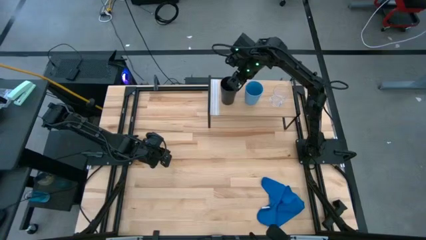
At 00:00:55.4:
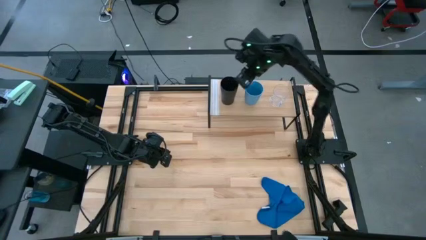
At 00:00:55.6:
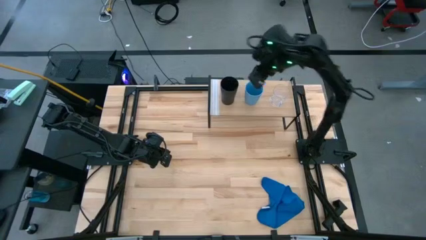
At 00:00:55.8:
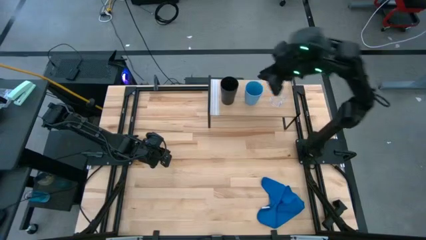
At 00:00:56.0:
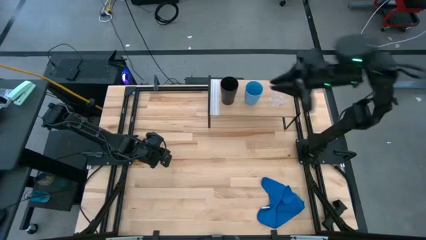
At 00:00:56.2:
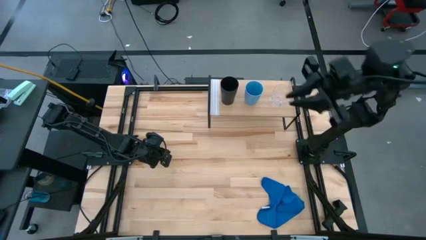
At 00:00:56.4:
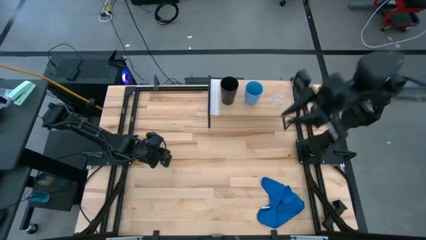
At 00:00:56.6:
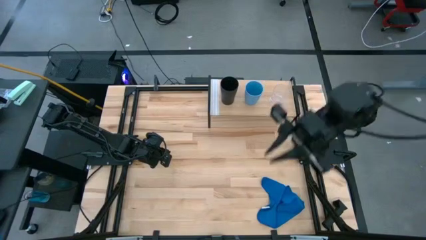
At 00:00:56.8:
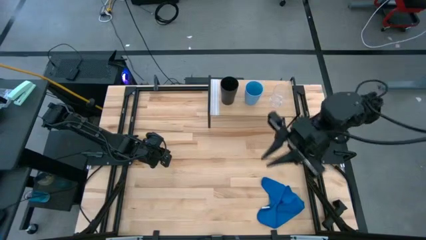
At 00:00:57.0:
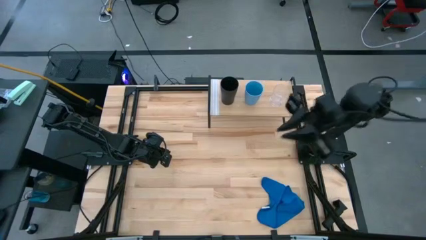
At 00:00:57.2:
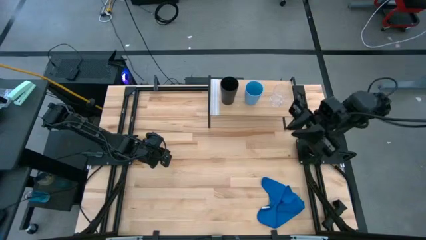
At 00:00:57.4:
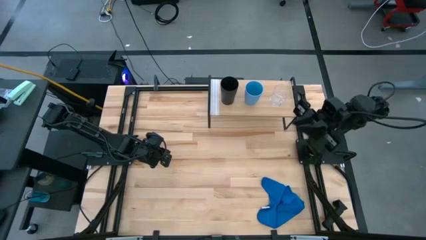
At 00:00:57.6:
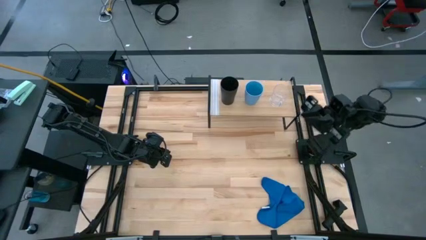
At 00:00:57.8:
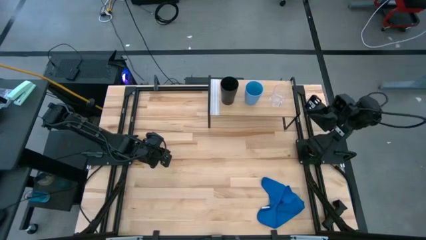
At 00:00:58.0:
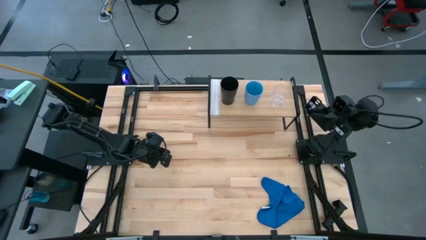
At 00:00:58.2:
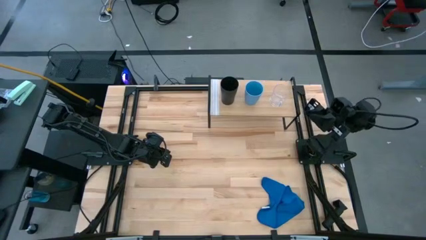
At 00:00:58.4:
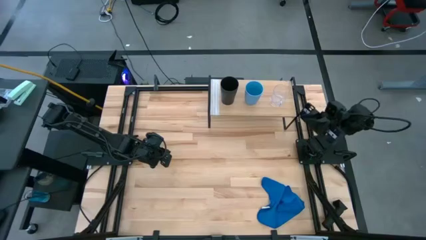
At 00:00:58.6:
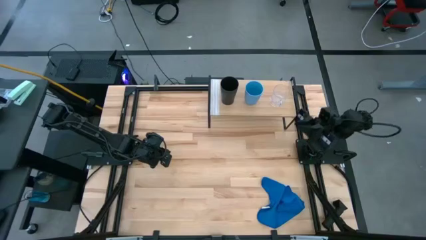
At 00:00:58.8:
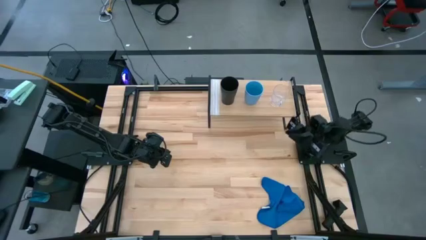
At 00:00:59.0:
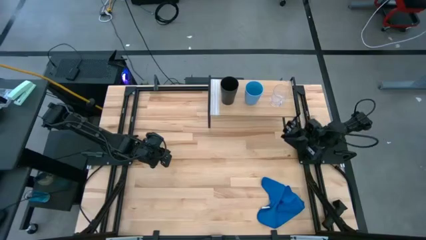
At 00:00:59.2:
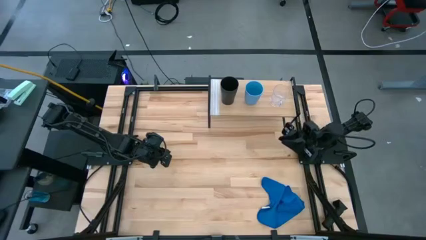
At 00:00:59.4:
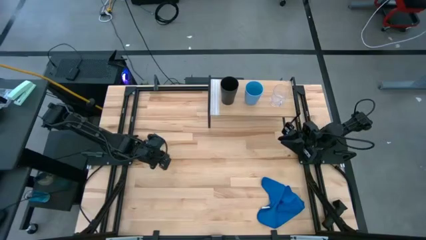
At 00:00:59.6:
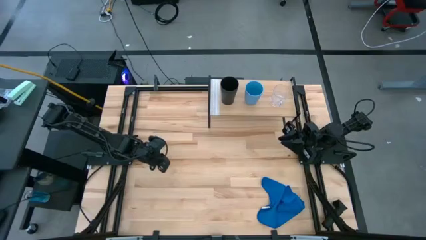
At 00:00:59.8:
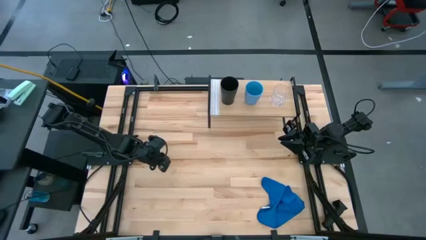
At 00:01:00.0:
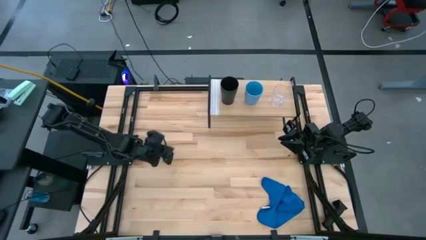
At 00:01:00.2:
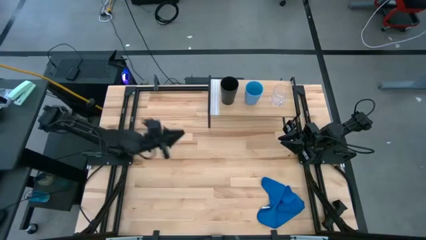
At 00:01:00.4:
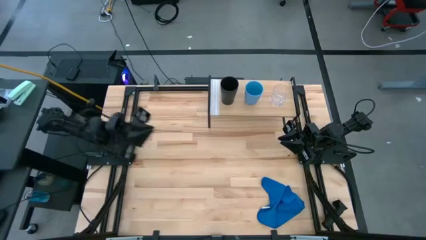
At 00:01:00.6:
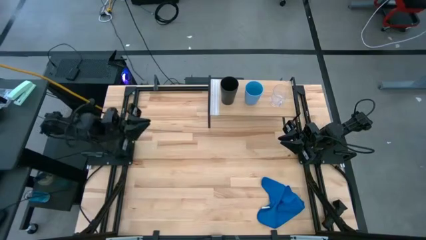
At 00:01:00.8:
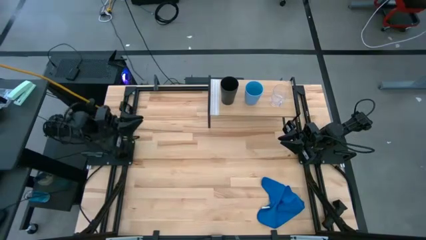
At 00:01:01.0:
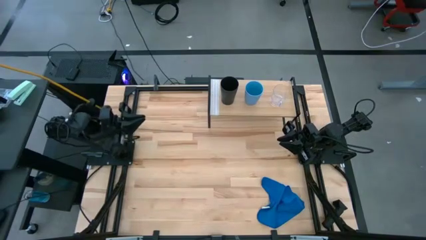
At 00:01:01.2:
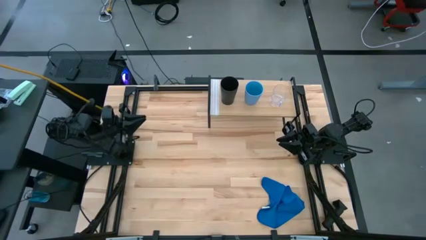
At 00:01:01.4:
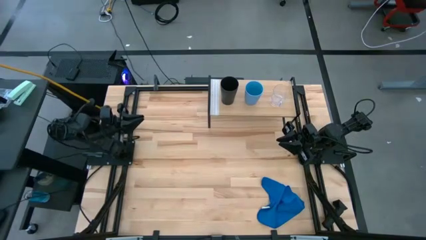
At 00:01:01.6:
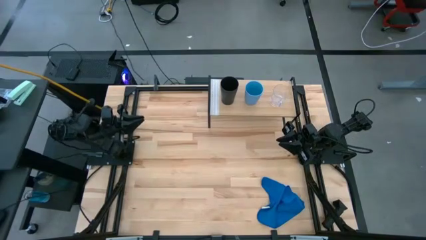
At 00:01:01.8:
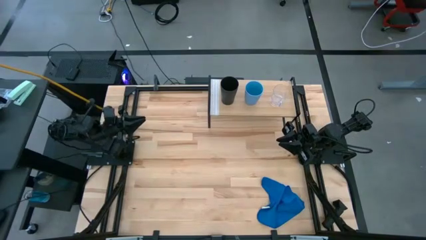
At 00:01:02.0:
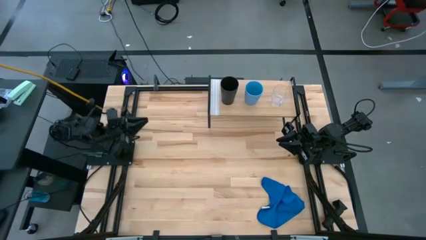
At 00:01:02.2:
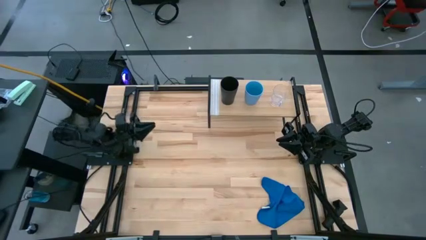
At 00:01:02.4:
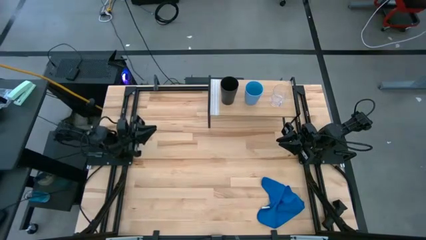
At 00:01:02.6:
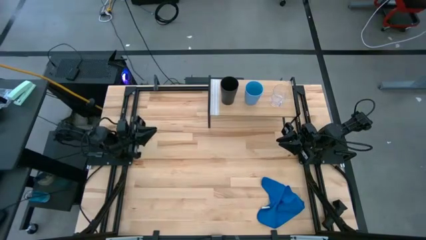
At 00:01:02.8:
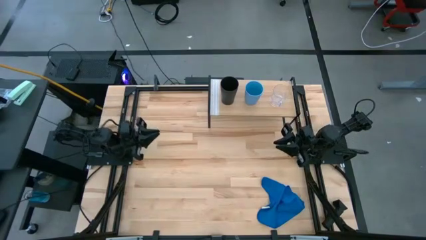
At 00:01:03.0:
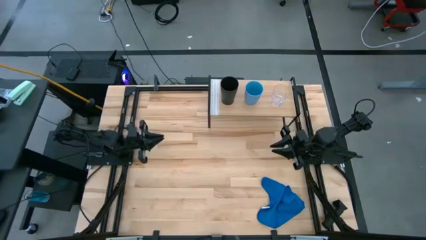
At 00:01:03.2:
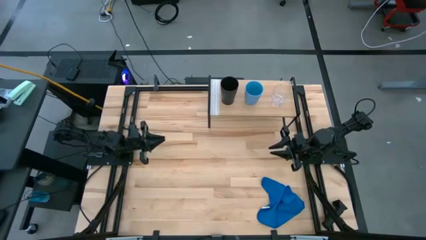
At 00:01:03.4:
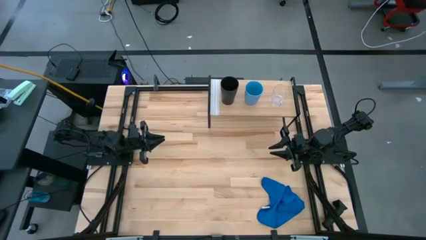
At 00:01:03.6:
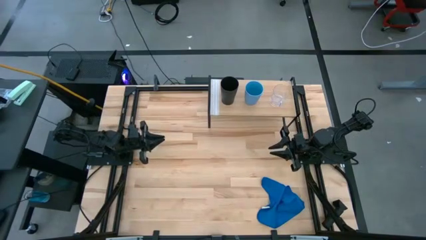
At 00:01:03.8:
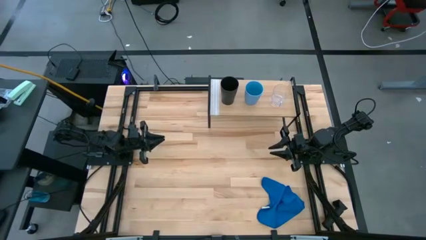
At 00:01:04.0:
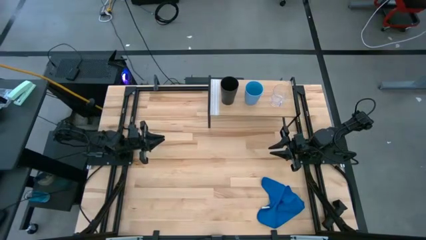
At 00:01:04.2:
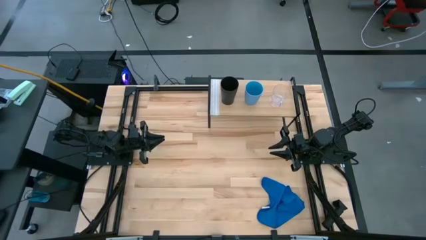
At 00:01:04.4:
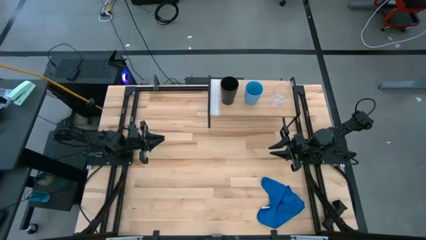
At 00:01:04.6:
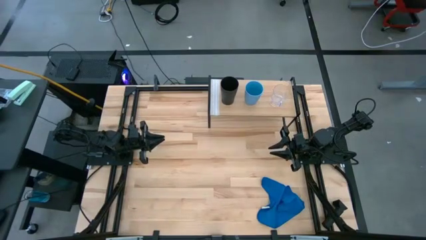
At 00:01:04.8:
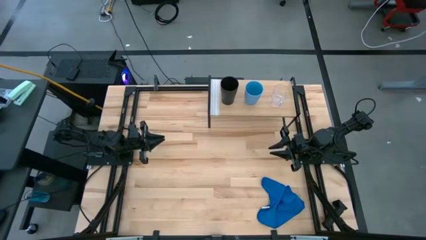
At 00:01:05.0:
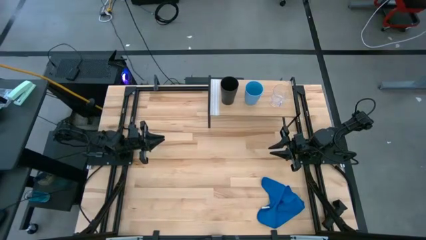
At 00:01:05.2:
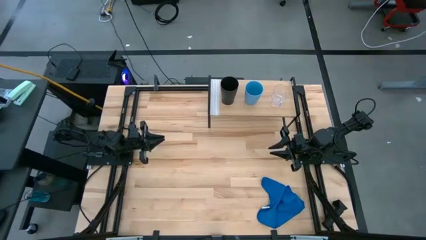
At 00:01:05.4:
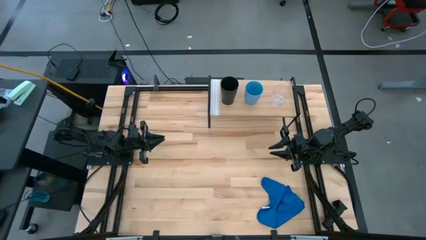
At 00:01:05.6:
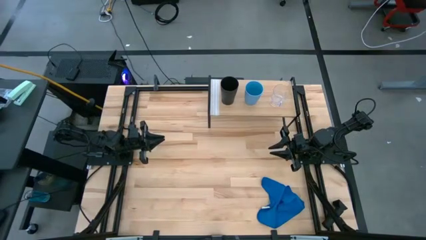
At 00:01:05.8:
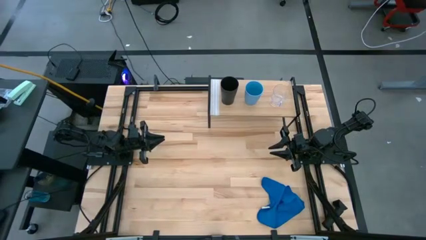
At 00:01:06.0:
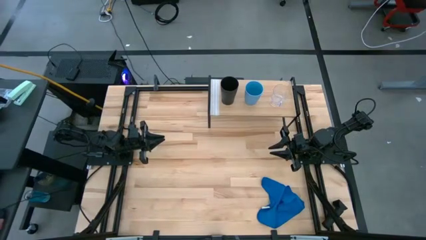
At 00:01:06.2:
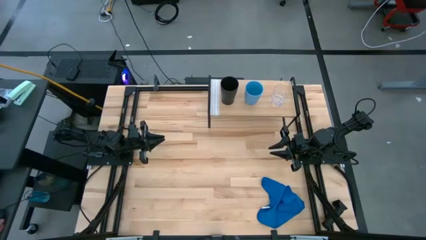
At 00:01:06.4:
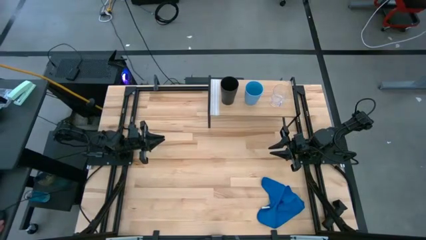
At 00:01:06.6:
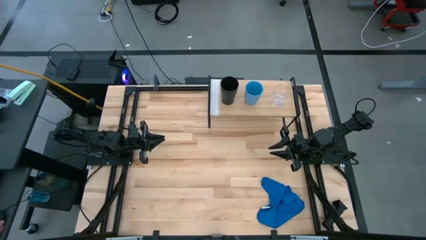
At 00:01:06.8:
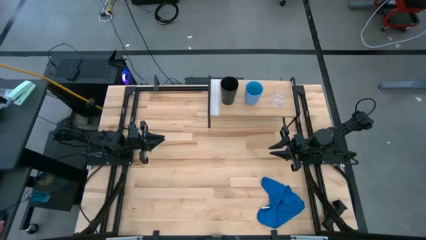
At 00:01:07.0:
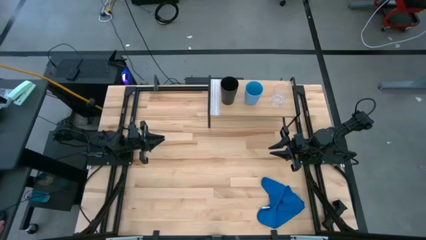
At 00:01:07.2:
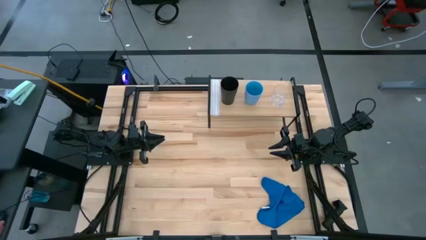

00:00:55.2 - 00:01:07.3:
Task: Stack small to large cups/mugs on shelf
Return to Home Position

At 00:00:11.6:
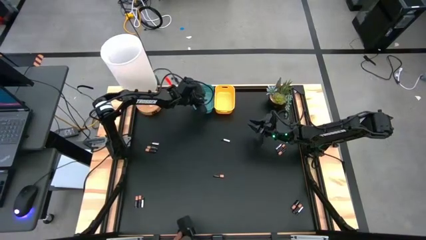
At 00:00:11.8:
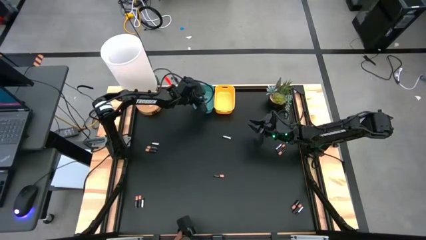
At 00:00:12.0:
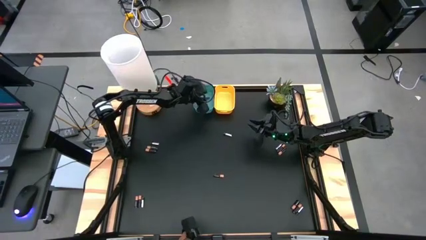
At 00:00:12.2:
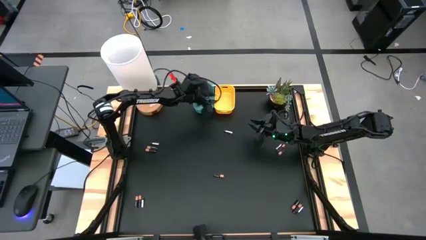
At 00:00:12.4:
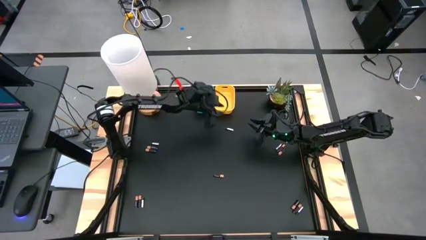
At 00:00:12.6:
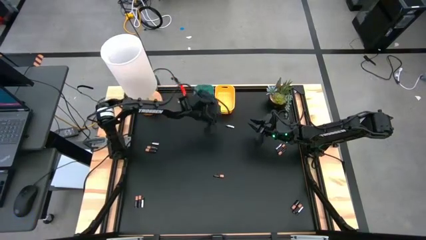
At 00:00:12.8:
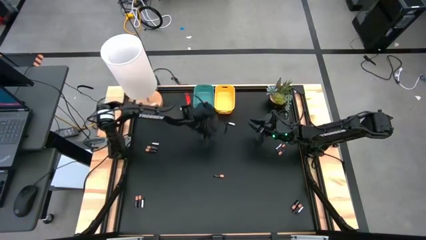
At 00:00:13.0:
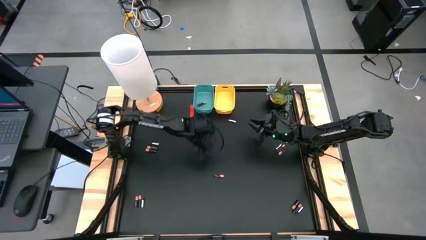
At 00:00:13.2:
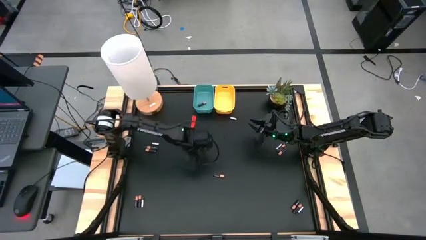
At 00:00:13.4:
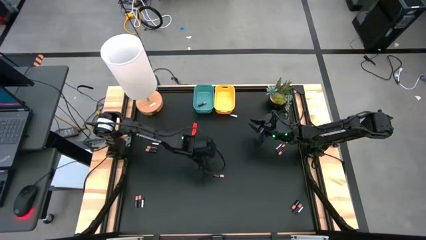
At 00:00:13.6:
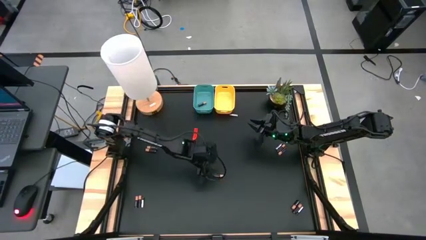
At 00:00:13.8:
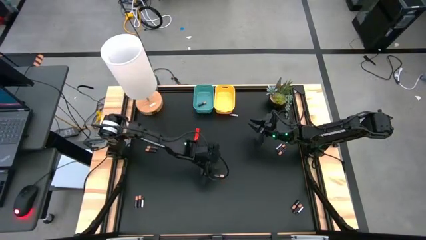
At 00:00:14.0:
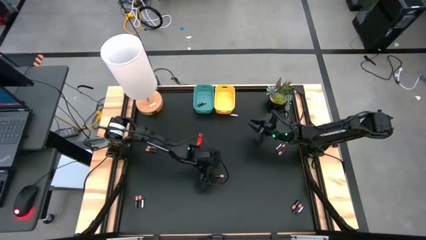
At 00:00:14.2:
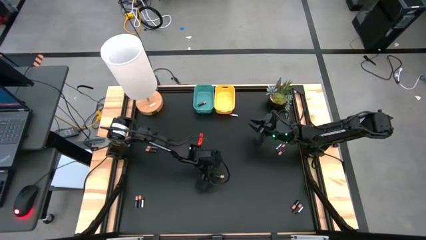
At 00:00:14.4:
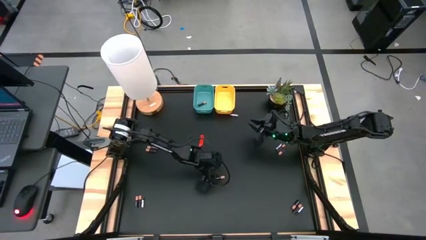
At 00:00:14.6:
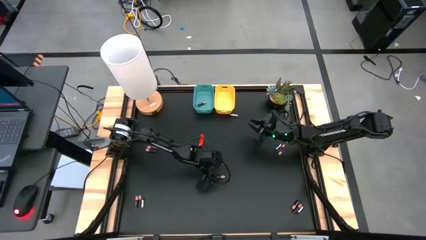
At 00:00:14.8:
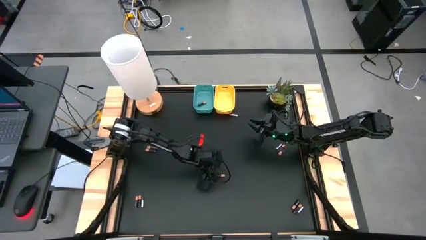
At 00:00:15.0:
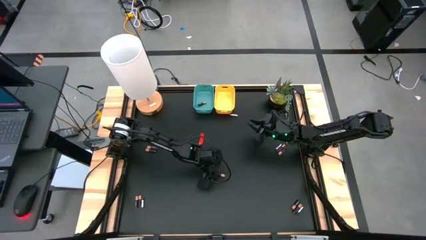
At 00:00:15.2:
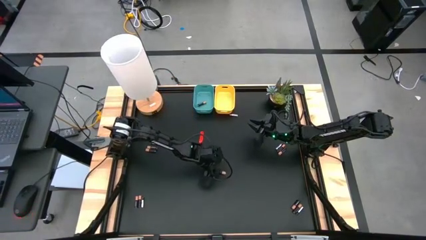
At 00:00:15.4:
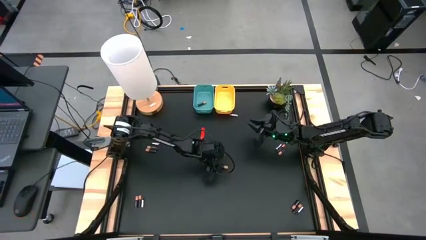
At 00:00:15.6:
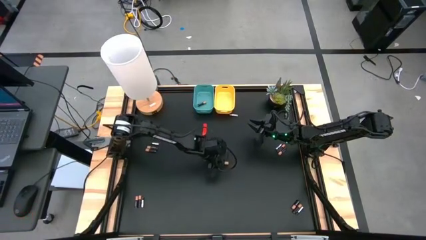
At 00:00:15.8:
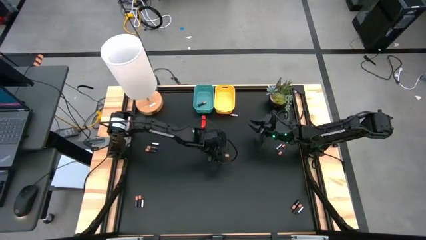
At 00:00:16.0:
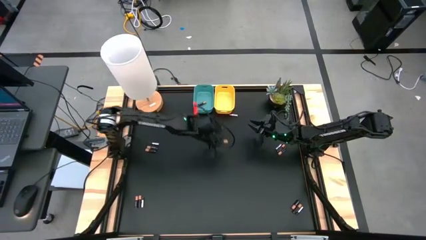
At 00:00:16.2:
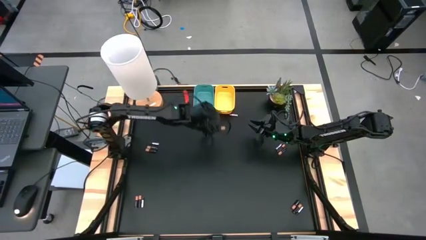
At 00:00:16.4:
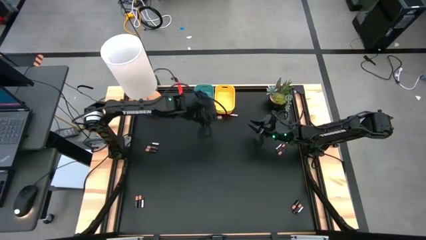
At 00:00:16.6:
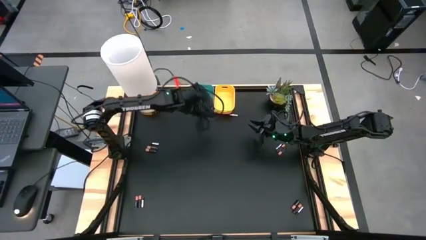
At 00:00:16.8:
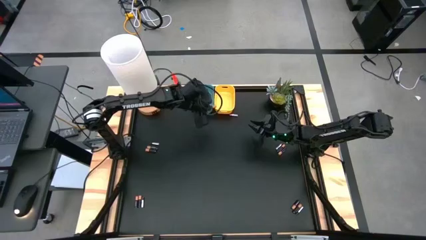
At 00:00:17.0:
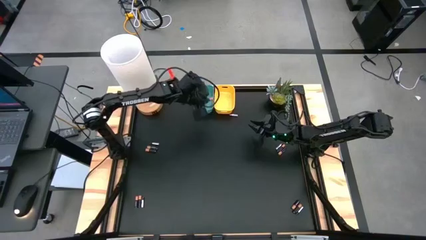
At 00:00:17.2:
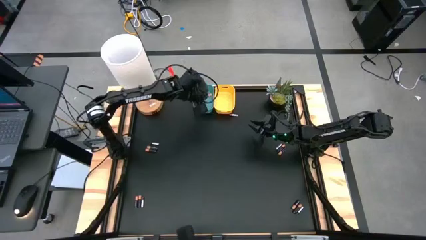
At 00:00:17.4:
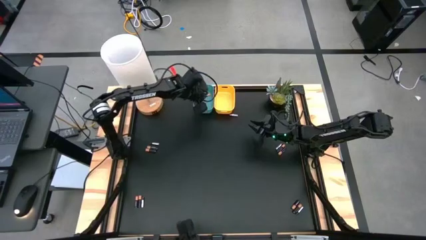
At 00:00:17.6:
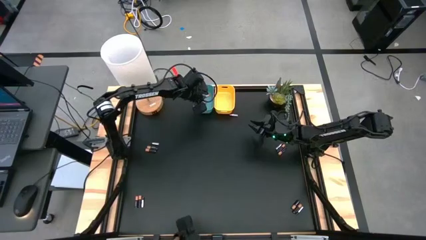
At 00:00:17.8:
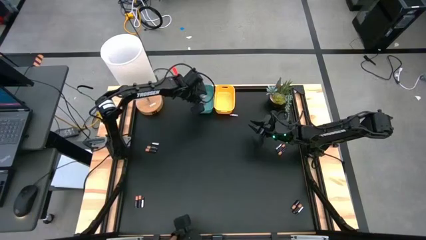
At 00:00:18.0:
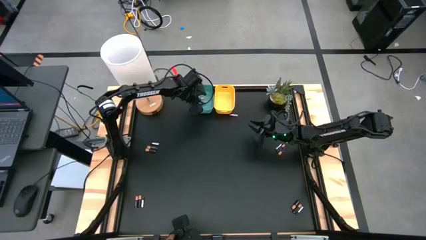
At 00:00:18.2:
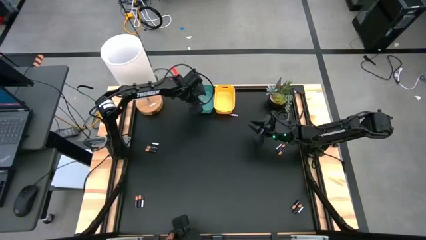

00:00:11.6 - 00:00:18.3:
Task: Sort batteries
Put the gold black battery into the blue bin
